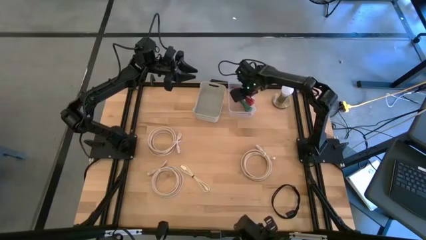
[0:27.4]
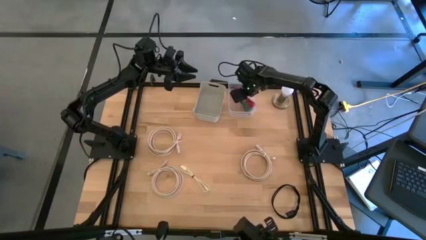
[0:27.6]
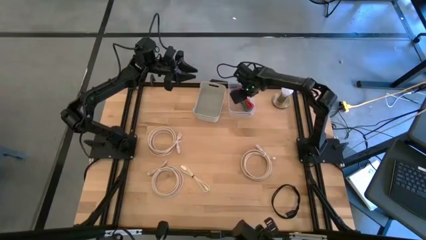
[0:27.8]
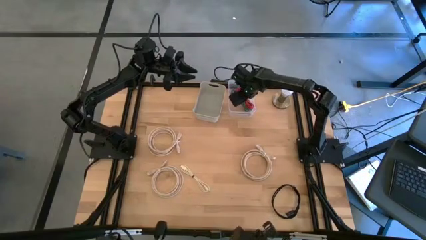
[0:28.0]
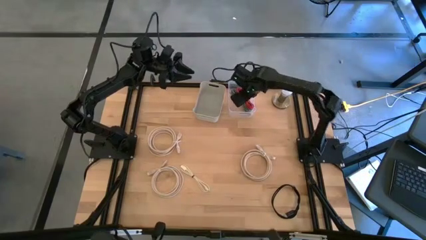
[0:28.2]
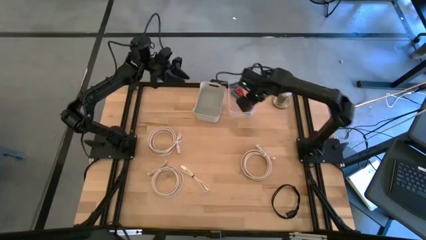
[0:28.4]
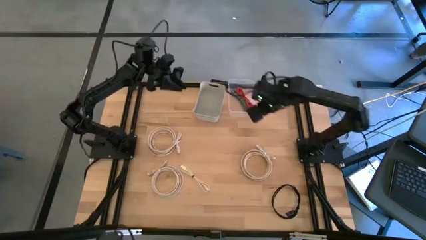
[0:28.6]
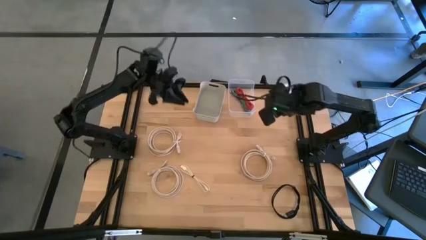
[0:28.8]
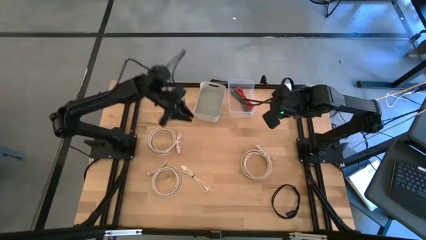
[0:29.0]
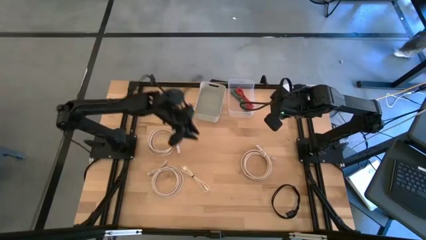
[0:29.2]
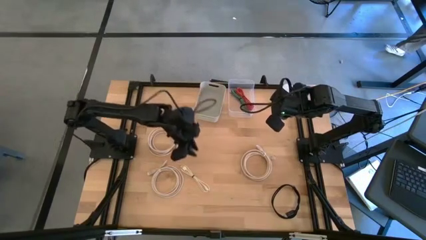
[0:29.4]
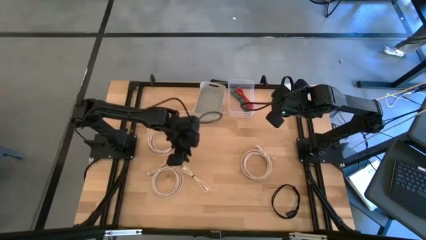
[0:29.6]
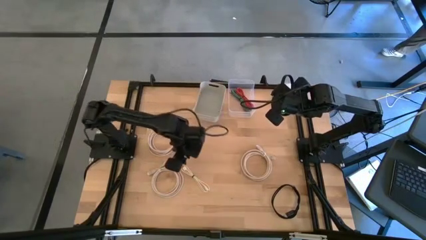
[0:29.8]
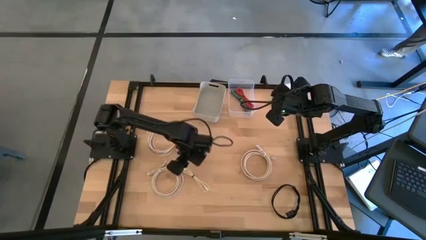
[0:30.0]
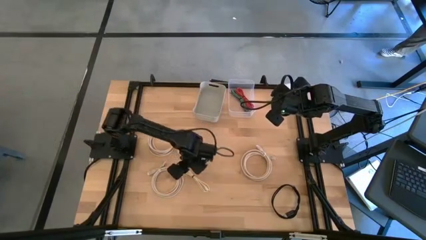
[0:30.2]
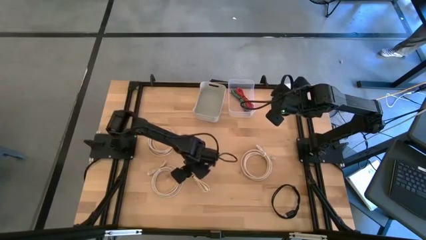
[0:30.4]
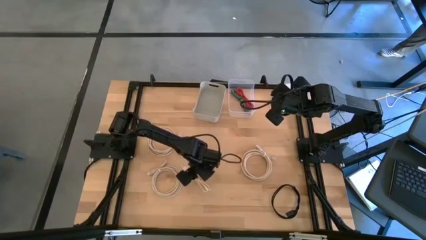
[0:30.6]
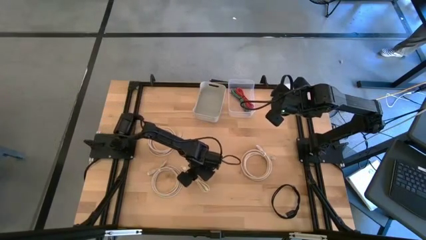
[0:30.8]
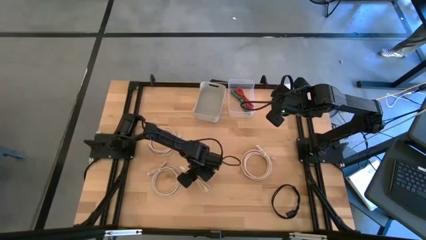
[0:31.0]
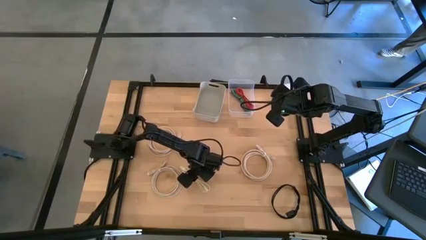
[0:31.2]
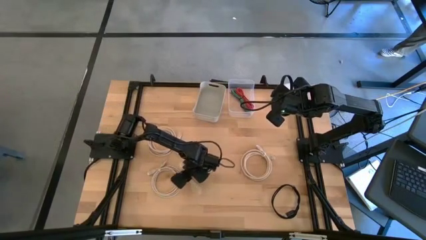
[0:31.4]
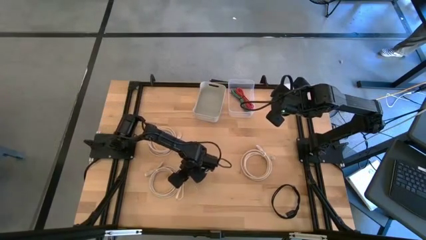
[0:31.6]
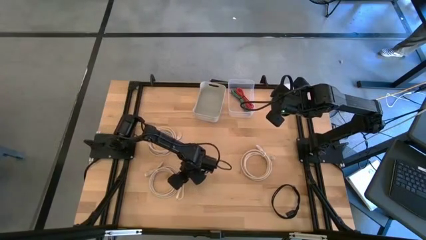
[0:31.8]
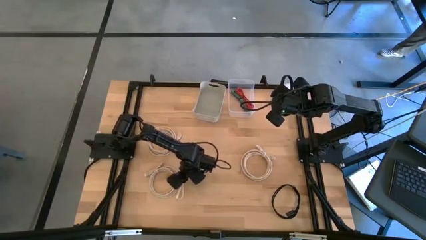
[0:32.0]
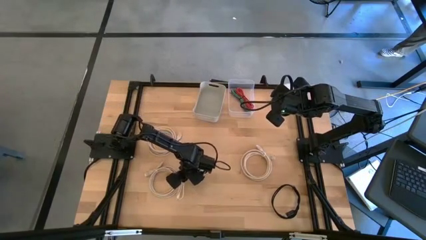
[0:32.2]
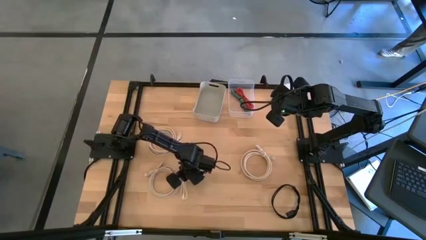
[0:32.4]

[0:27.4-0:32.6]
Put the white usb cable into the transparent bin

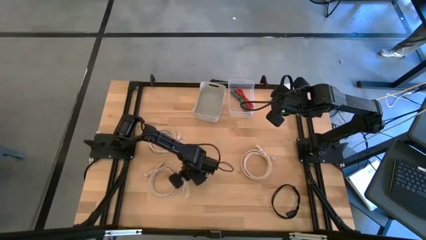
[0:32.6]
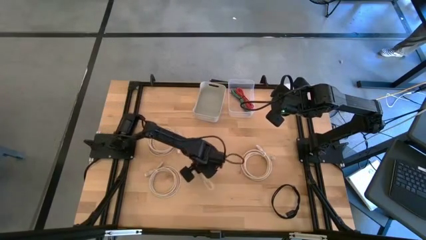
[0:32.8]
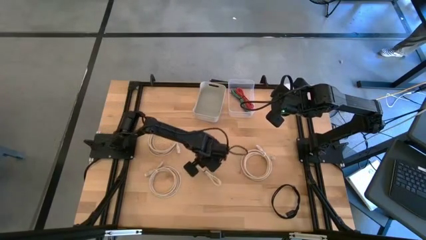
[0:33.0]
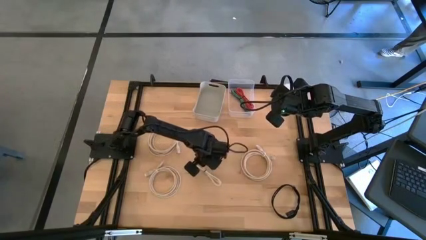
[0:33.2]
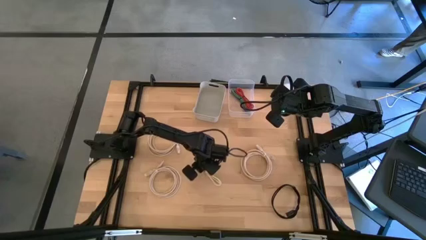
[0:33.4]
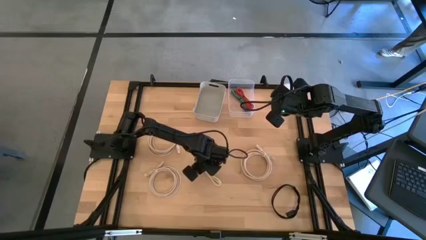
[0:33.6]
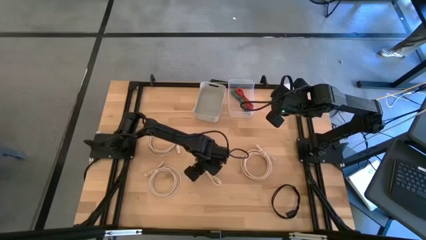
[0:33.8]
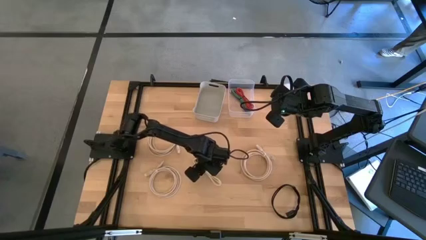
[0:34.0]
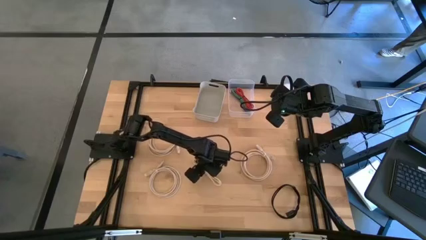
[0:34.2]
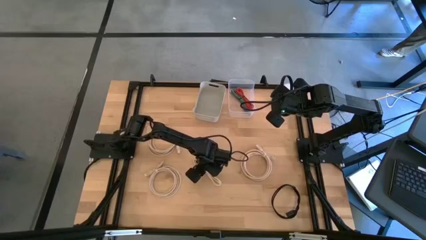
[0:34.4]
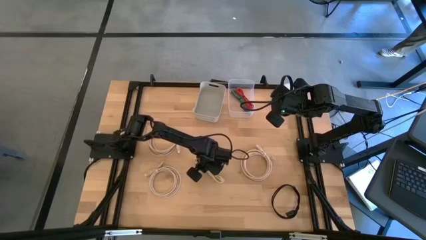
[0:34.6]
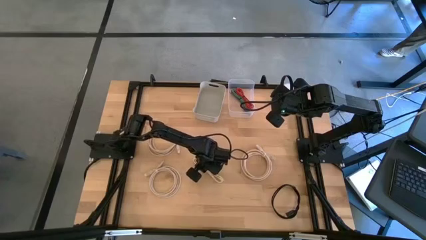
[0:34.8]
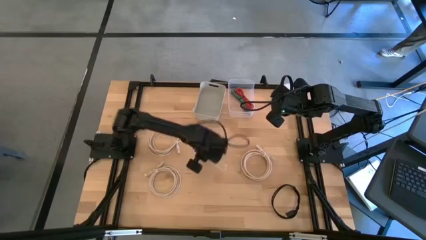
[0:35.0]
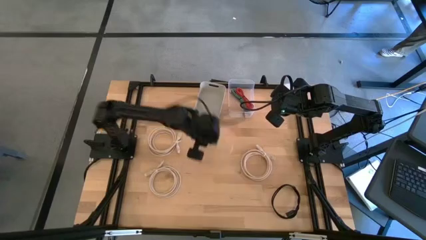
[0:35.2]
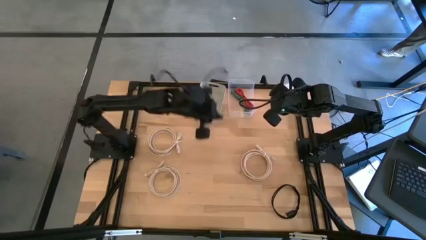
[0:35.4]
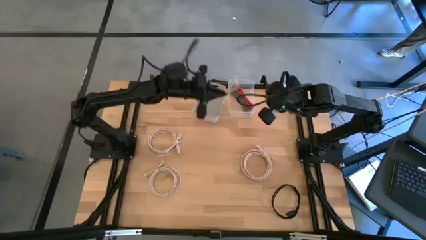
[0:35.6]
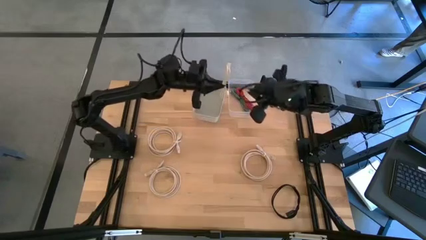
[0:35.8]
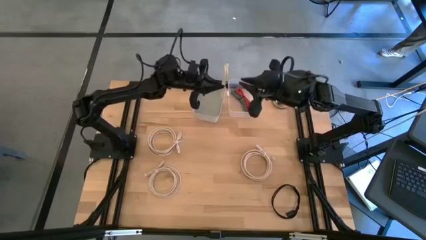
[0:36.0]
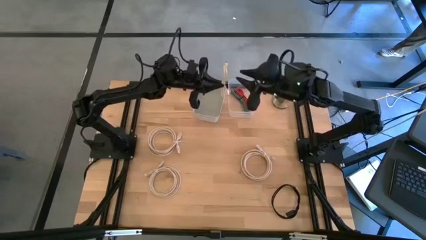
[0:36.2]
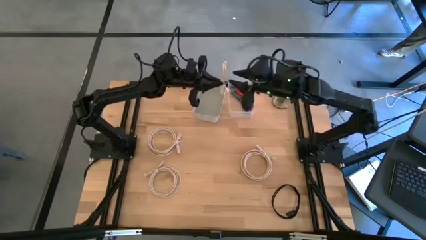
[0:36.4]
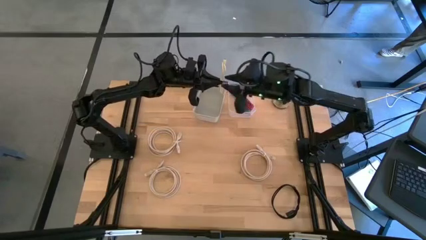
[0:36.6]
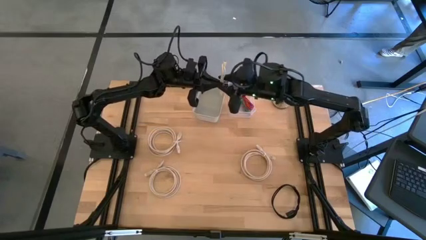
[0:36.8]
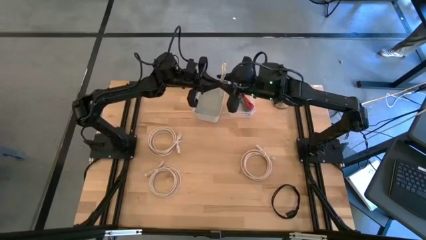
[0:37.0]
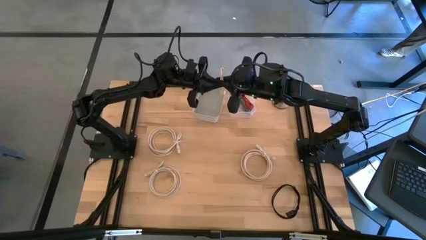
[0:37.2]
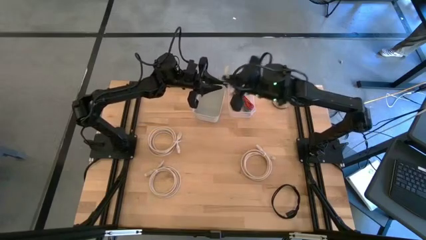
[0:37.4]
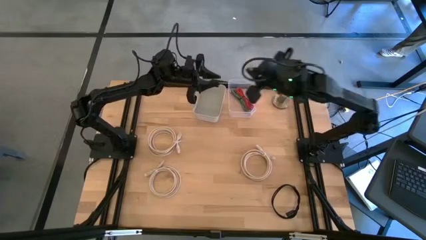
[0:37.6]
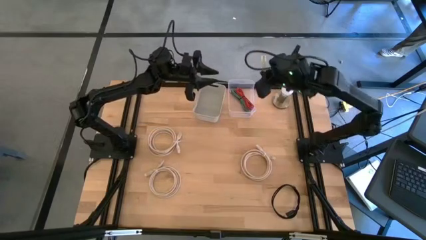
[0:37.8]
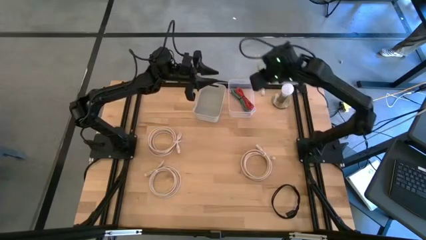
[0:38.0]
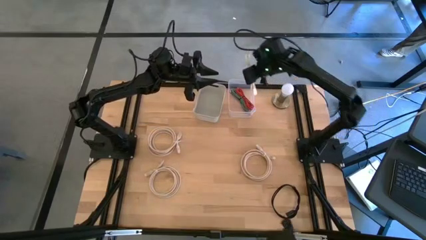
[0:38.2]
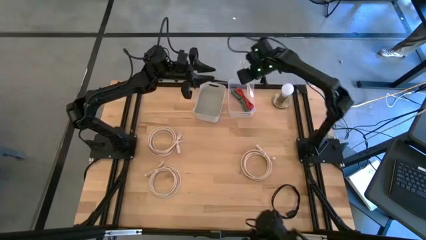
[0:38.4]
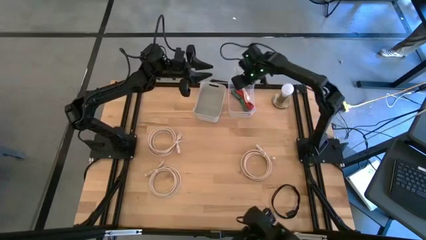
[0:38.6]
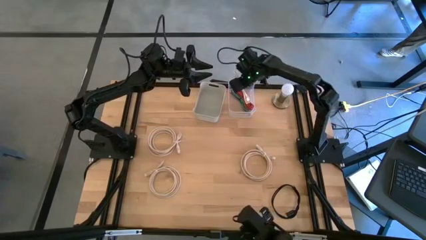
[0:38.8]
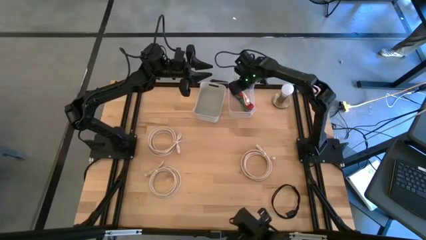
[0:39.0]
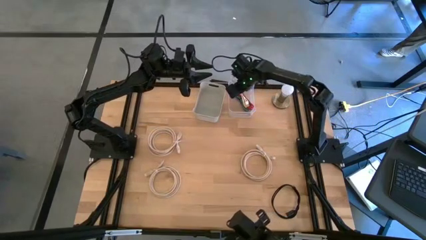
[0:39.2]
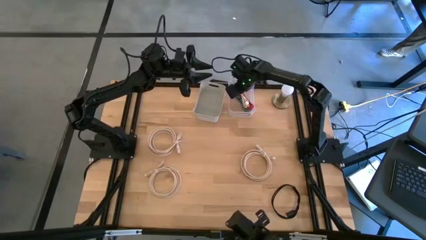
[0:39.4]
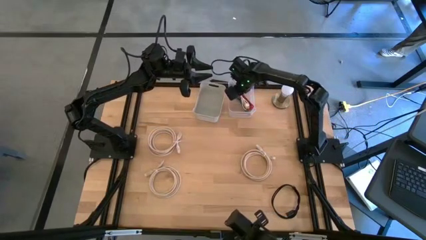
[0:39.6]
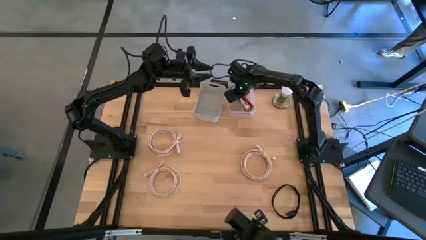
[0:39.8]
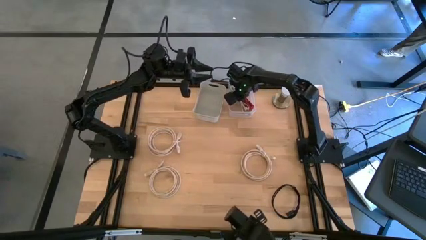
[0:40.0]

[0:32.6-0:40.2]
Put the white usb cable into the transparent bin

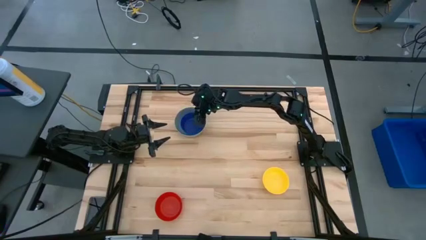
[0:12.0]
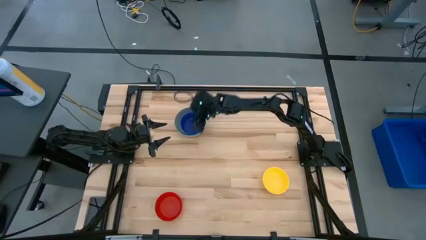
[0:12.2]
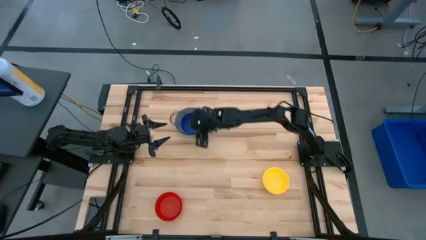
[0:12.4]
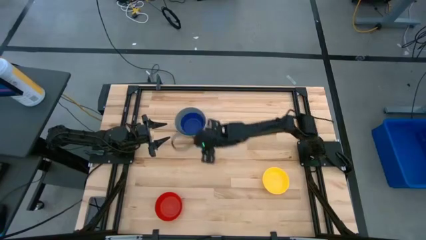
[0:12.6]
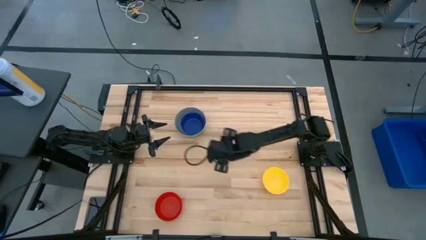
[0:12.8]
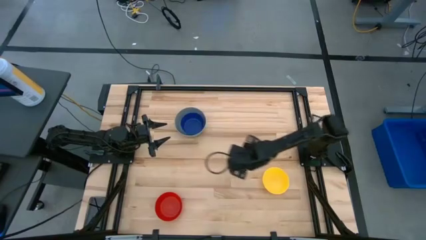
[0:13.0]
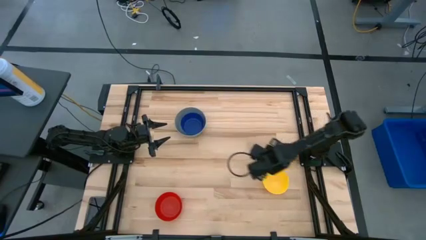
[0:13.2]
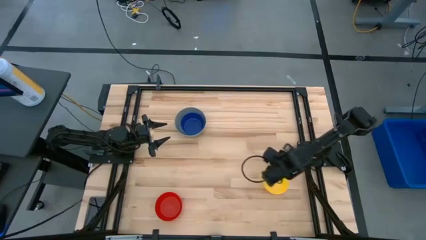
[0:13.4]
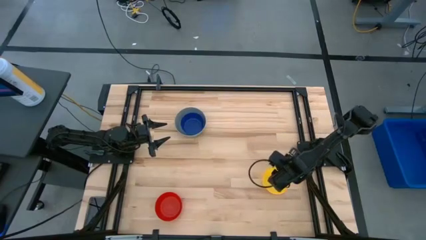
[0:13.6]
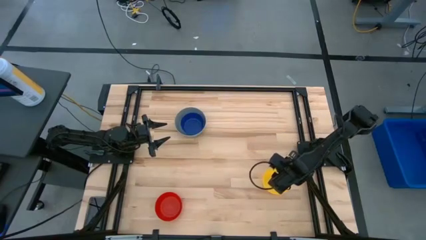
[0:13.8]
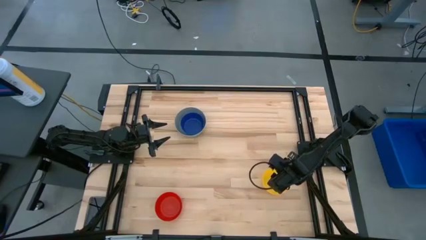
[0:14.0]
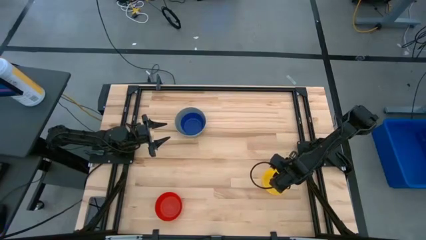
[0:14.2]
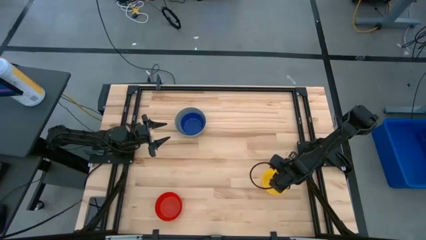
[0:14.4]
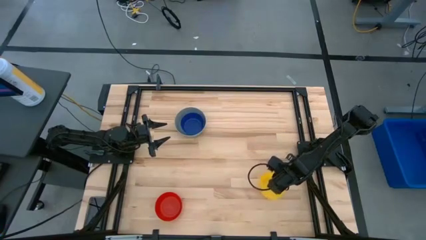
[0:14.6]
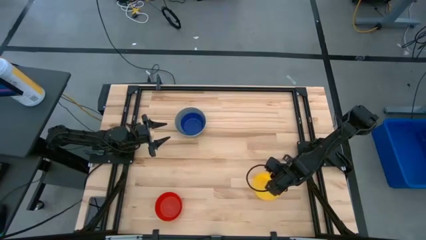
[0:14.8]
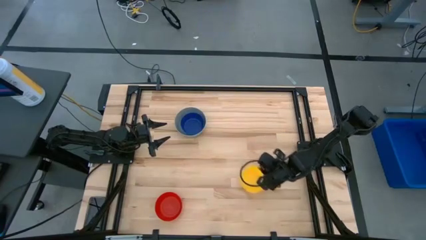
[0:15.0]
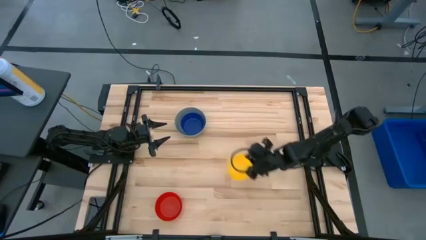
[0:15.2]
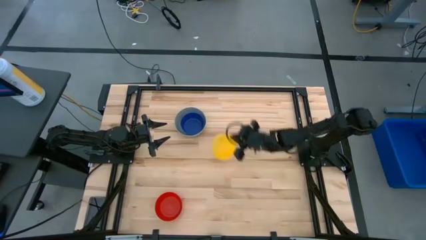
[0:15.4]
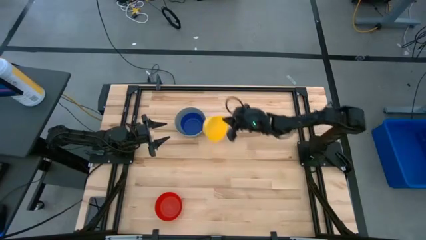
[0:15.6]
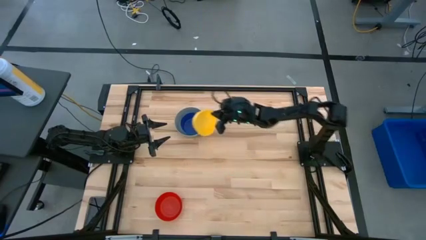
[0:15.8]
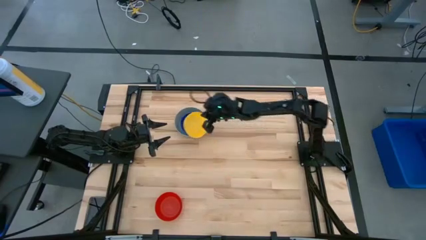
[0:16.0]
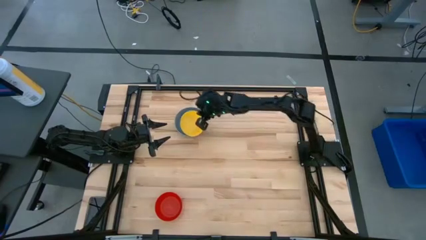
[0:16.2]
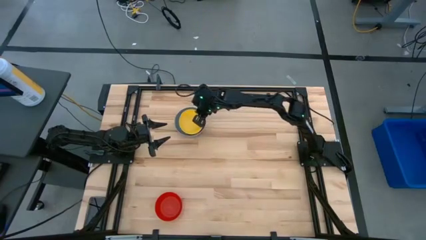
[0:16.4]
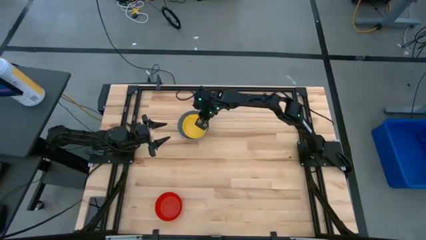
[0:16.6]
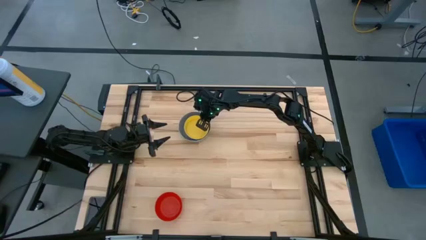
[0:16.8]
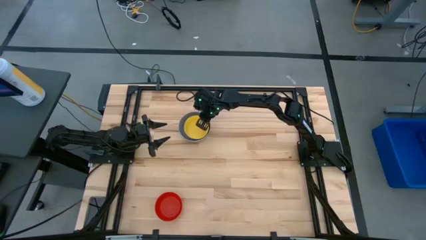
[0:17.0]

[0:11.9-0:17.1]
Stack the yellow bowl on the blue bowl
